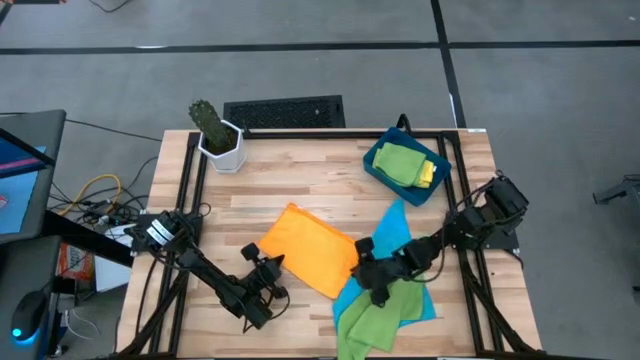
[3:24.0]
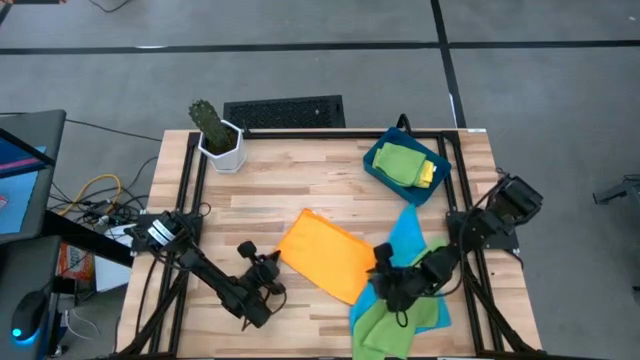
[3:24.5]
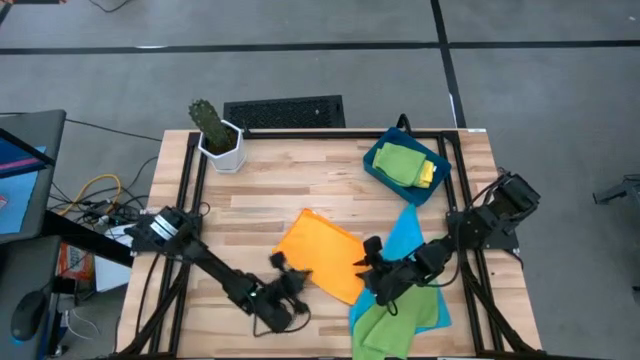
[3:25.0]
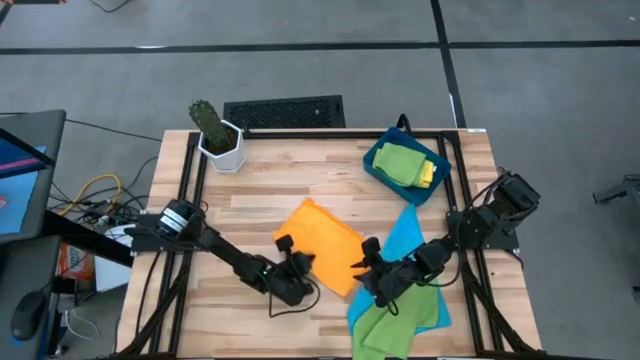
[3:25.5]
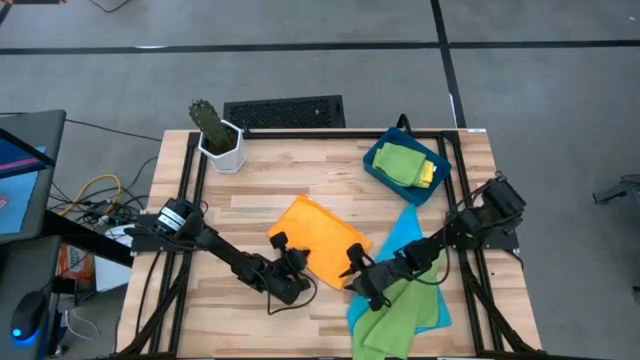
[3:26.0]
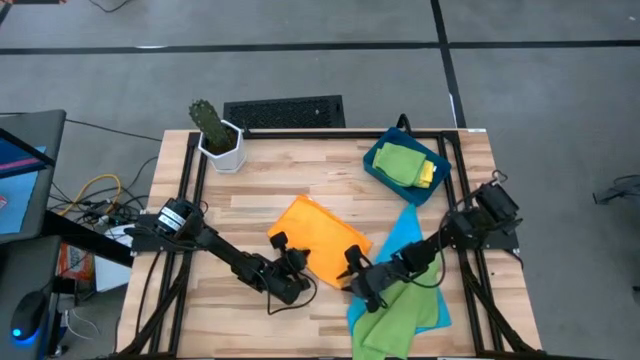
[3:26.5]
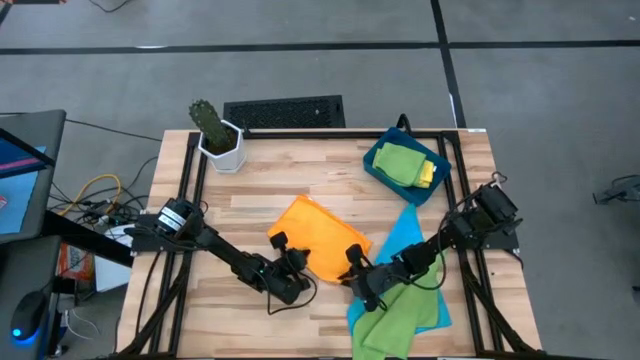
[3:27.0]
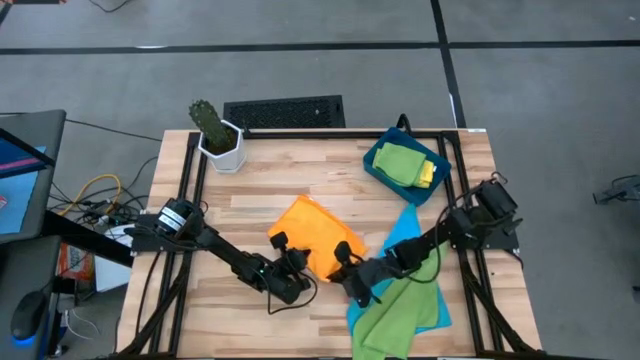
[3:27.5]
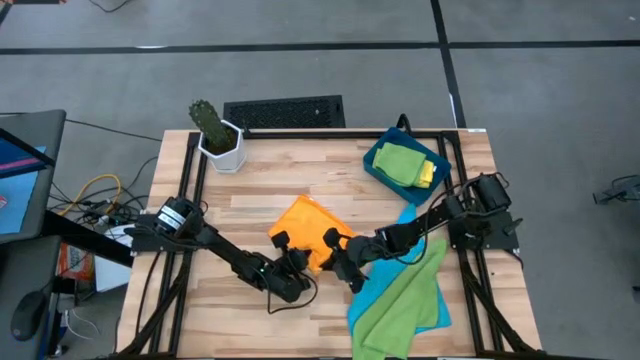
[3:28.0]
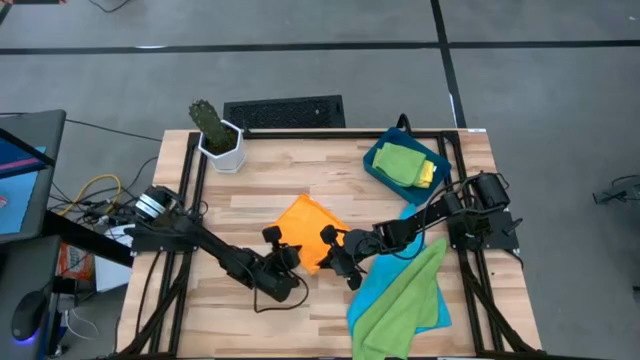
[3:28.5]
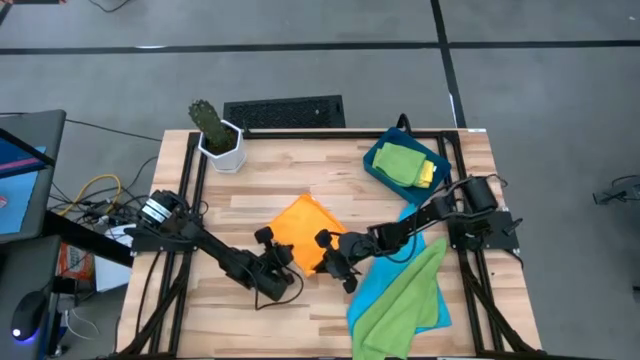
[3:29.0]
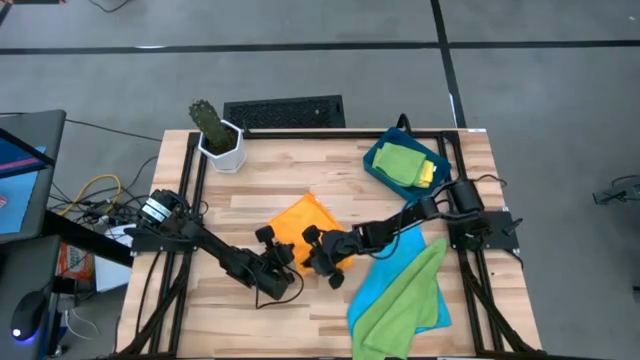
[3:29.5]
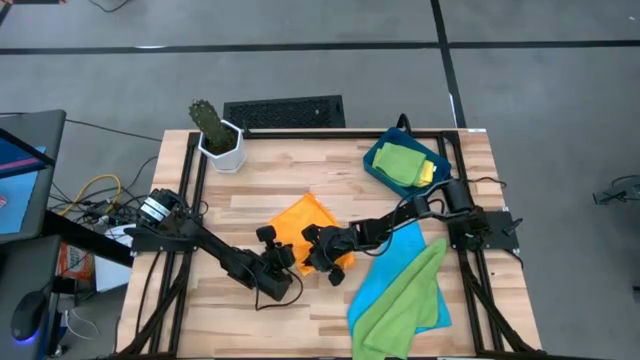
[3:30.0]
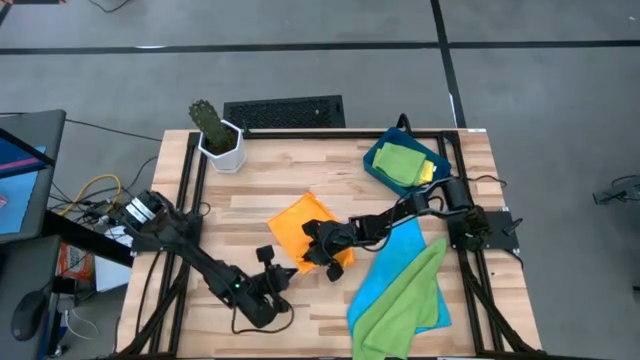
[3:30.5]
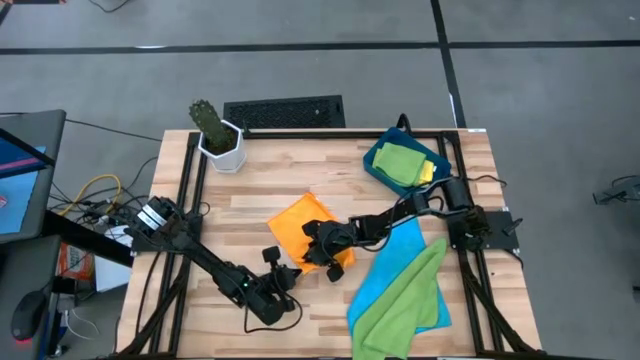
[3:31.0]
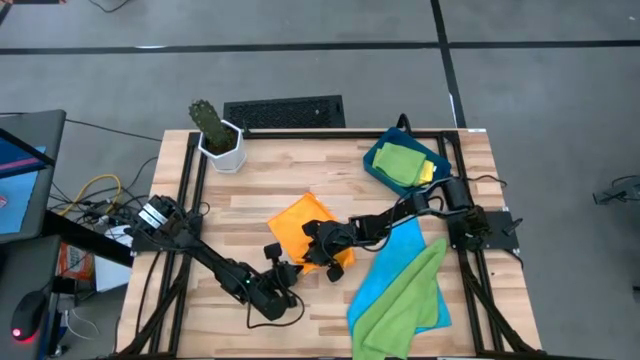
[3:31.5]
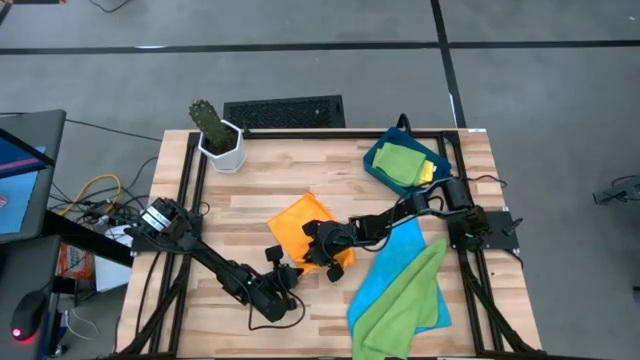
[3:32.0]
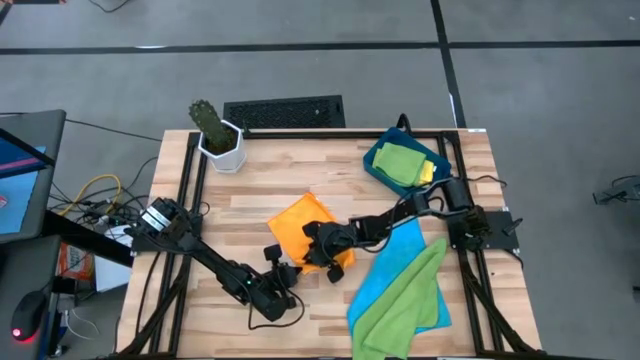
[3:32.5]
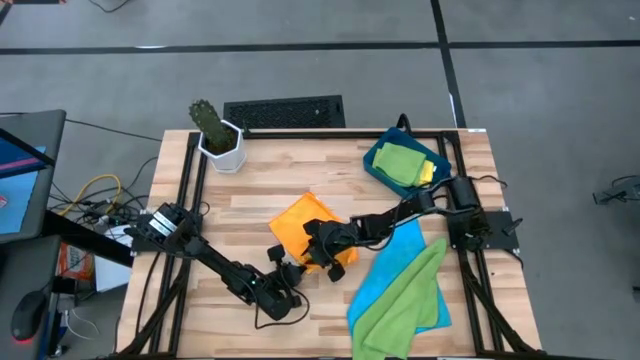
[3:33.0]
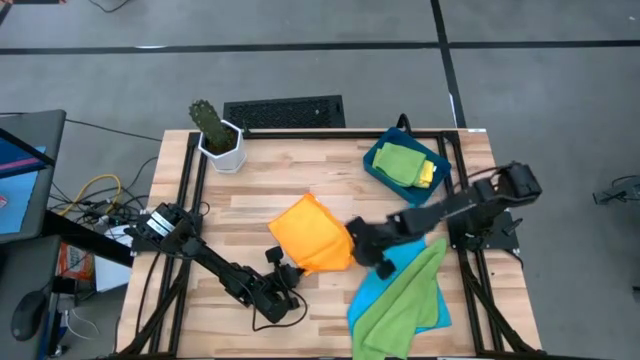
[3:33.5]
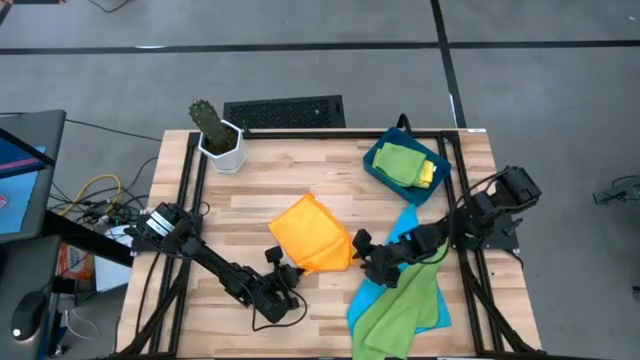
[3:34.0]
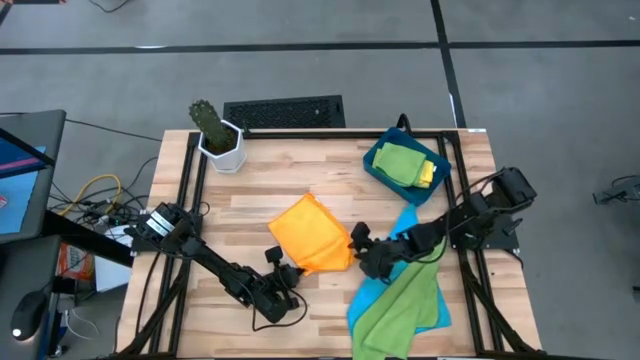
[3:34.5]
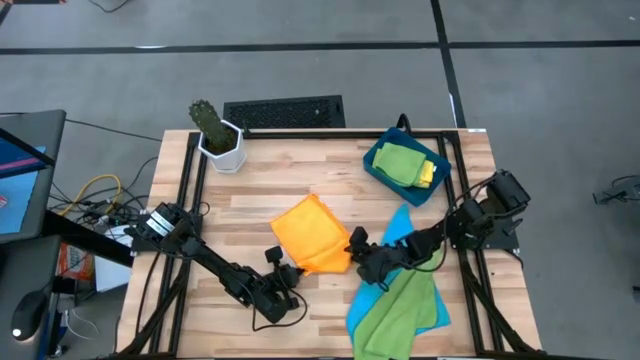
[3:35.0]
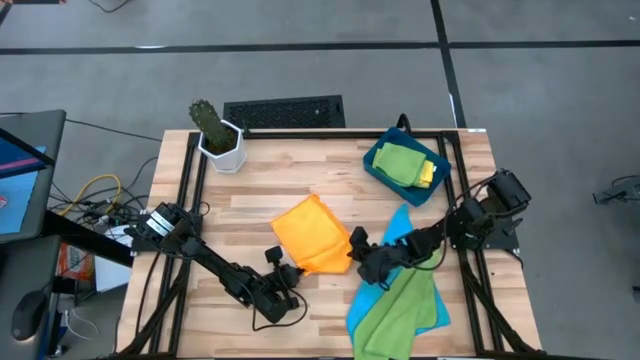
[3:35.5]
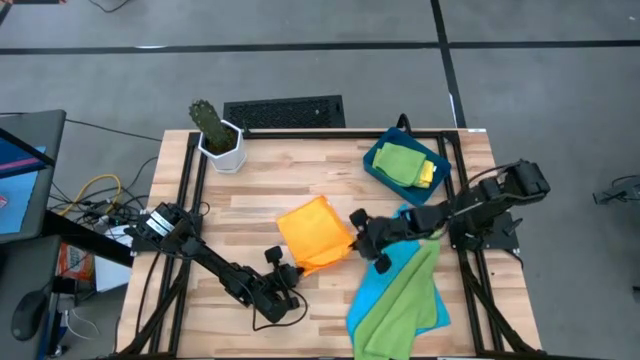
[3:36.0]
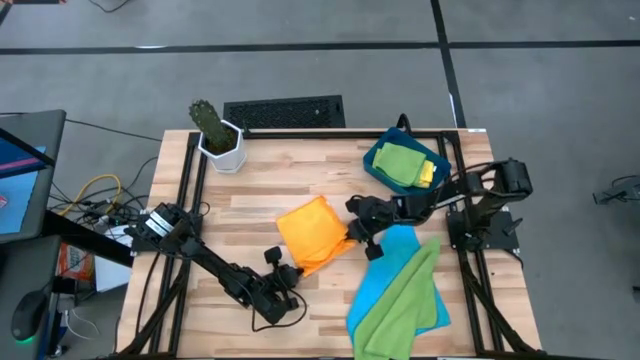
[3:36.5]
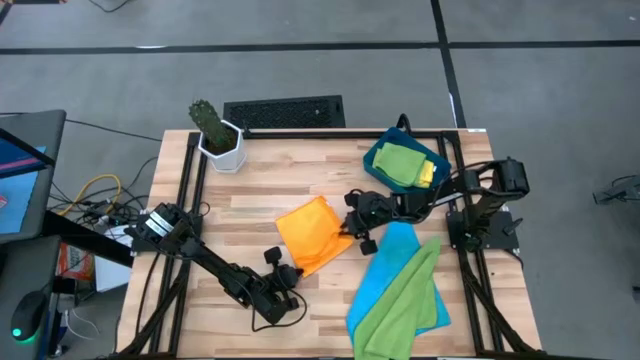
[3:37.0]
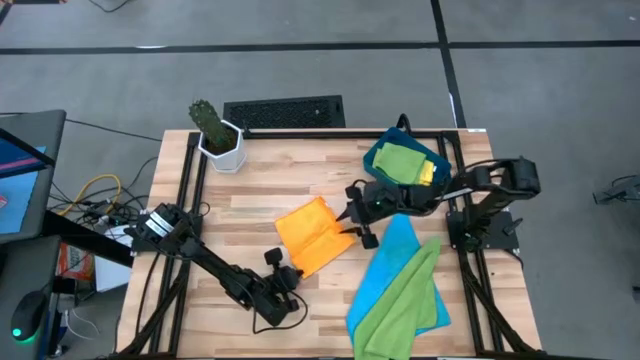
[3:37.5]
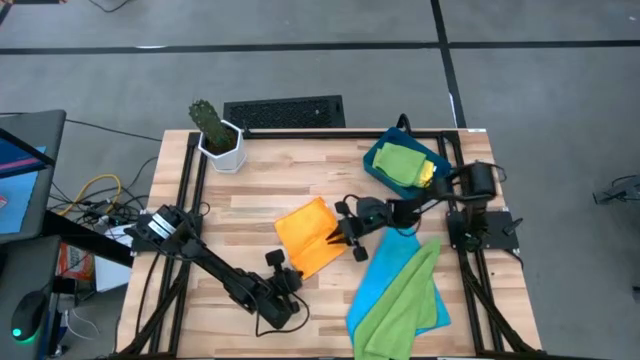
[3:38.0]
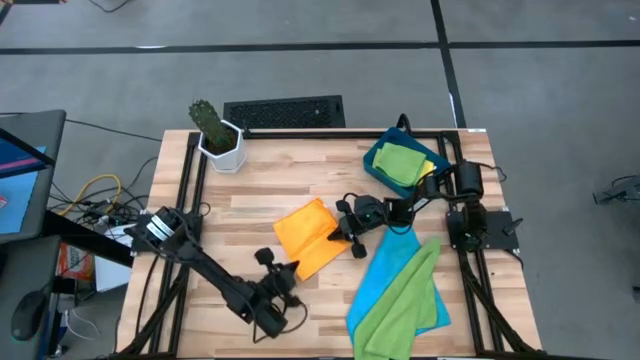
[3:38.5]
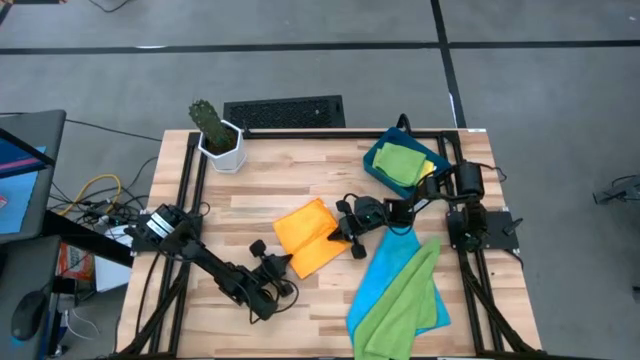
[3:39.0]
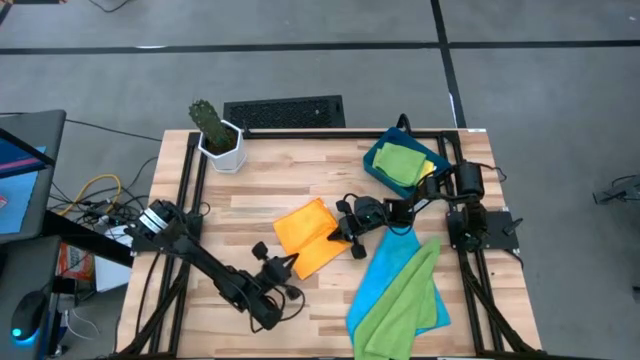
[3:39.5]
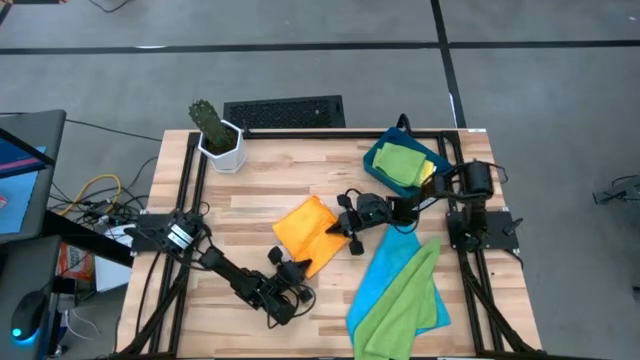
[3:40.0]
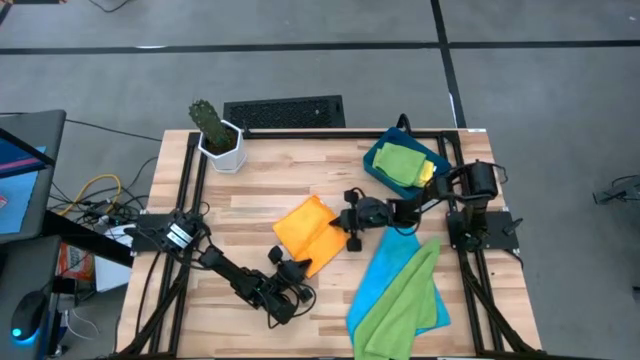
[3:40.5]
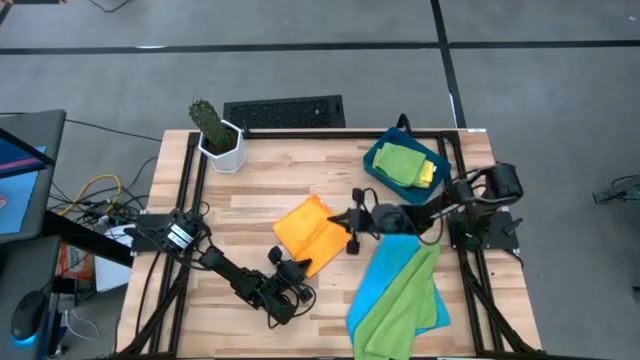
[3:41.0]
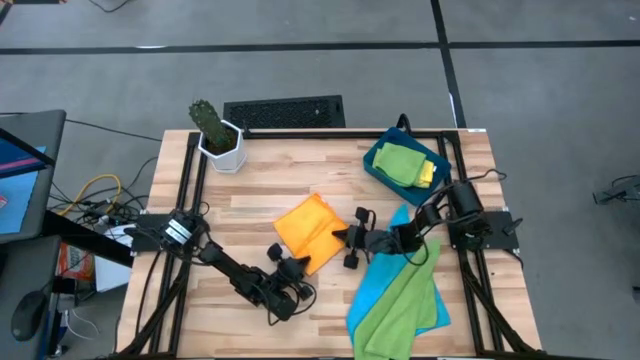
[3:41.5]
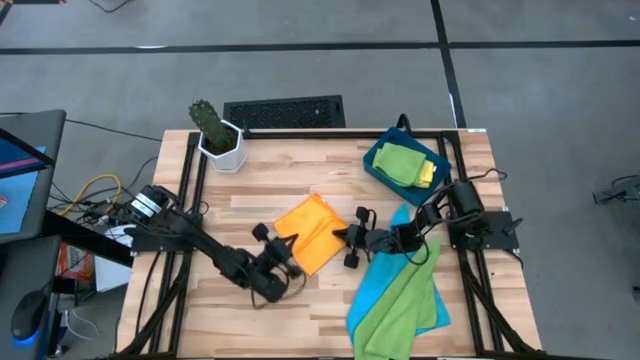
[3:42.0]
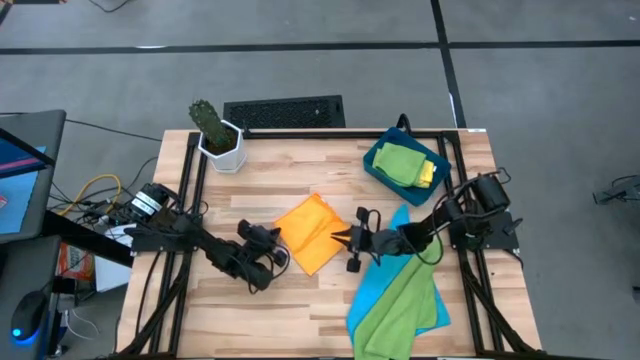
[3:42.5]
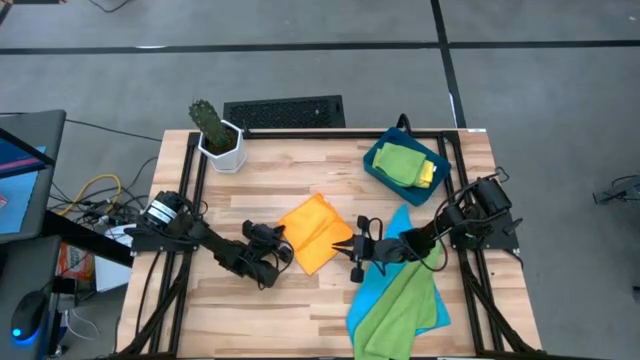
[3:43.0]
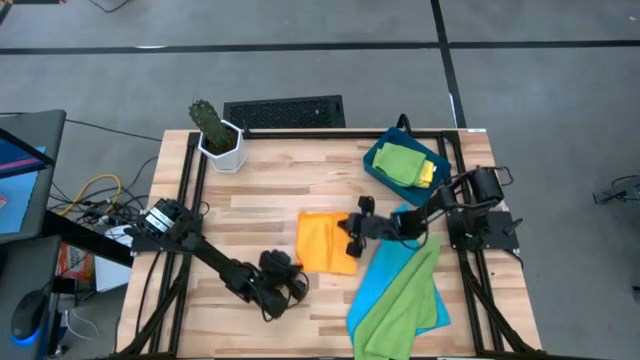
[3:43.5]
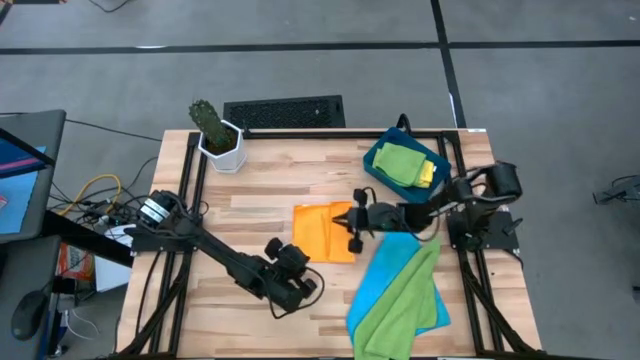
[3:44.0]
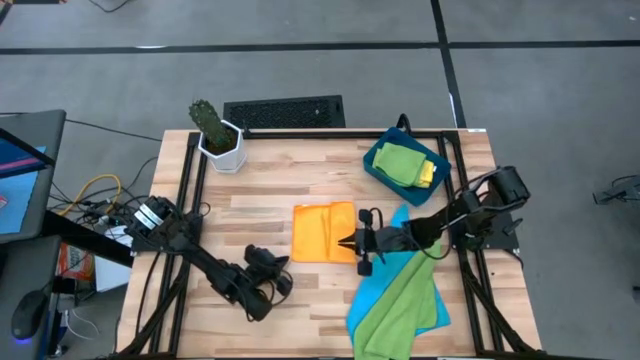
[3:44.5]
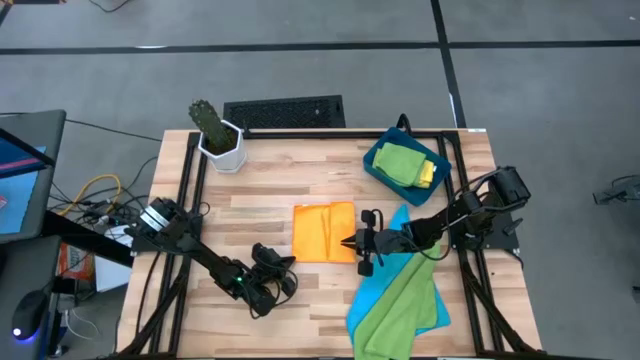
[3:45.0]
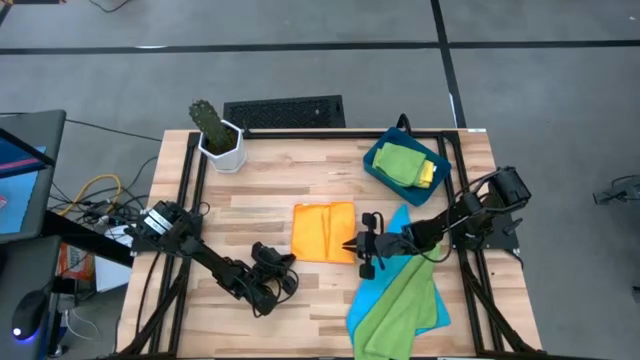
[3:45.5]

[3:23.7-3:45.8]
Task: Fold microfiber towels
Fold the orange microfiber cloth
